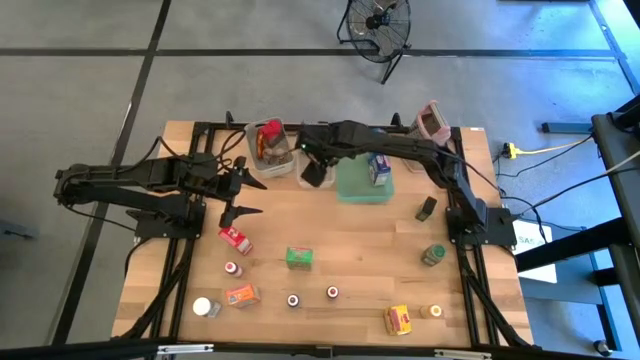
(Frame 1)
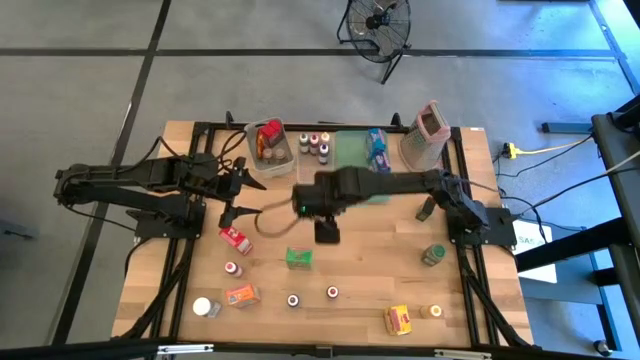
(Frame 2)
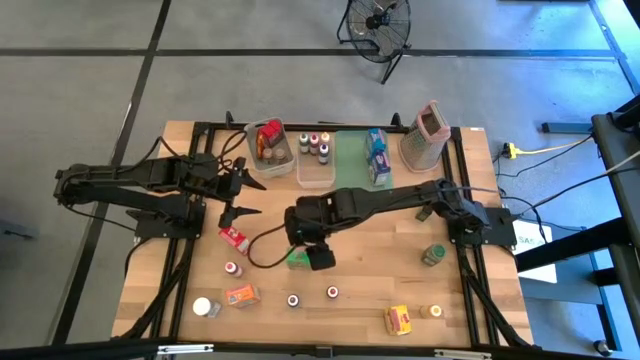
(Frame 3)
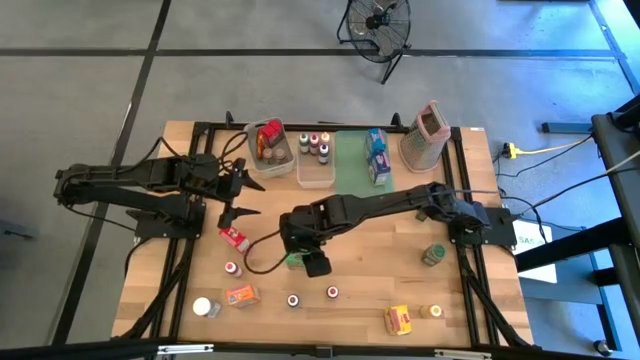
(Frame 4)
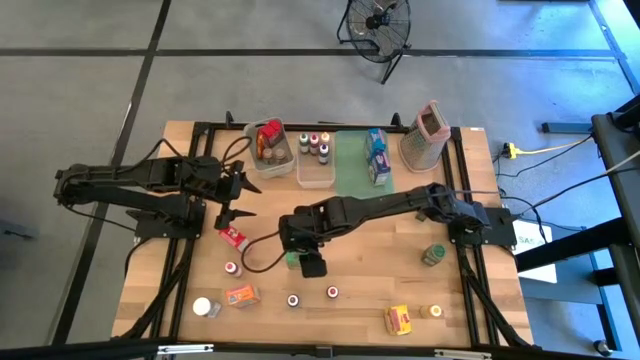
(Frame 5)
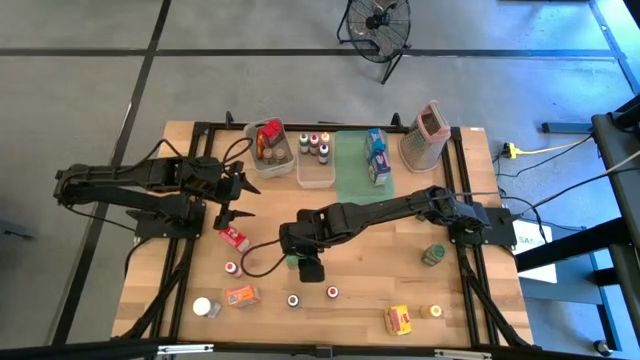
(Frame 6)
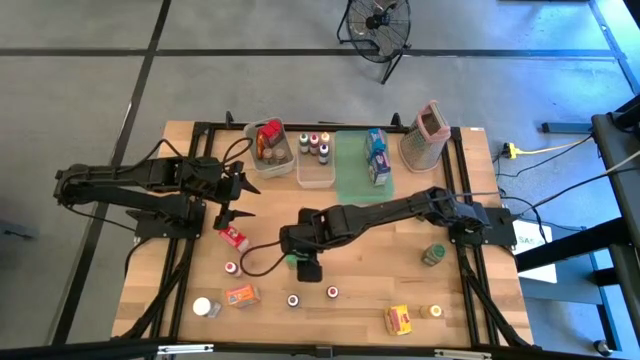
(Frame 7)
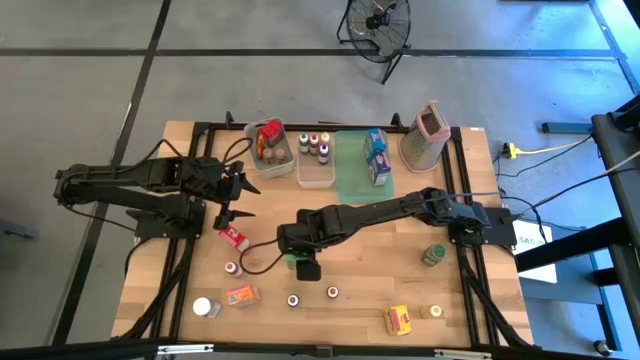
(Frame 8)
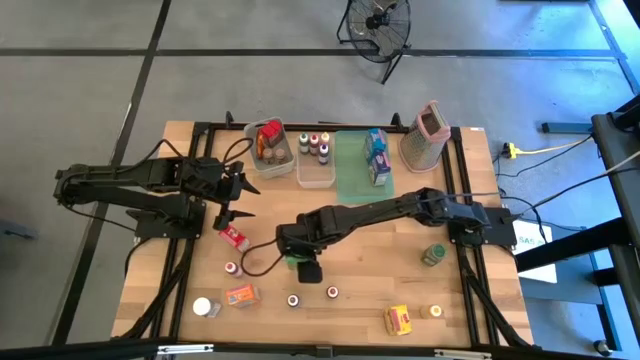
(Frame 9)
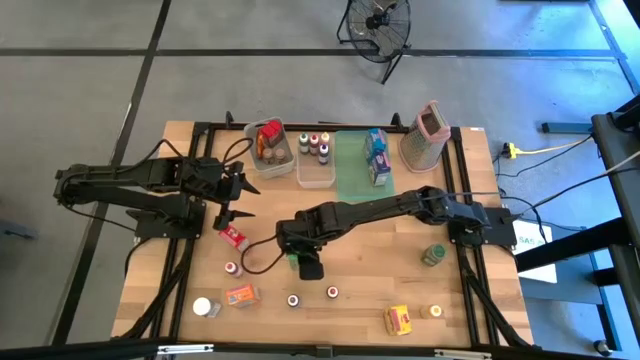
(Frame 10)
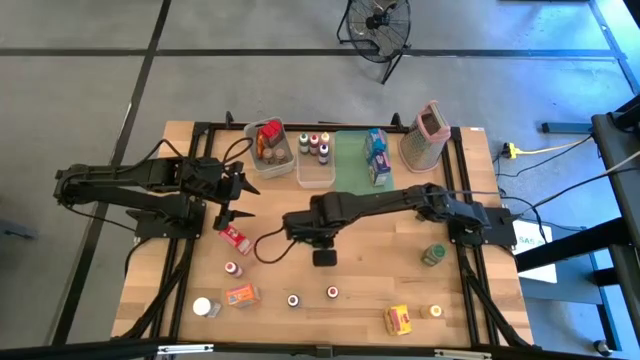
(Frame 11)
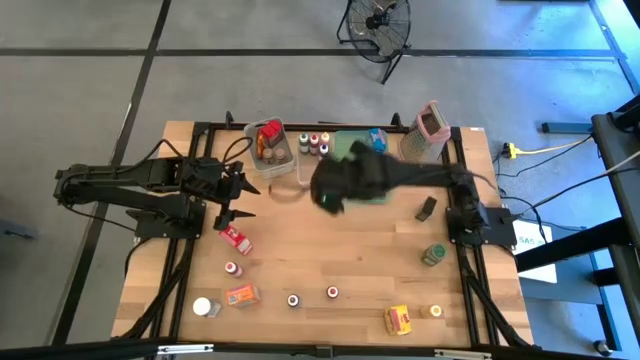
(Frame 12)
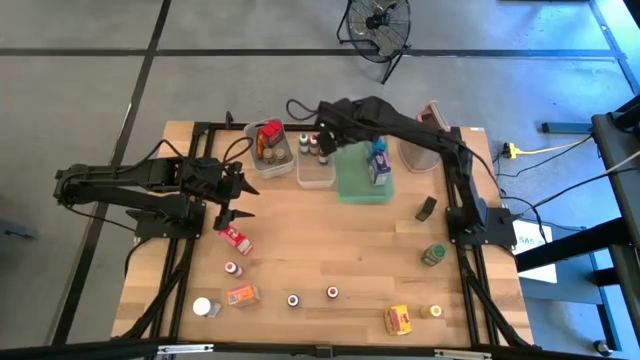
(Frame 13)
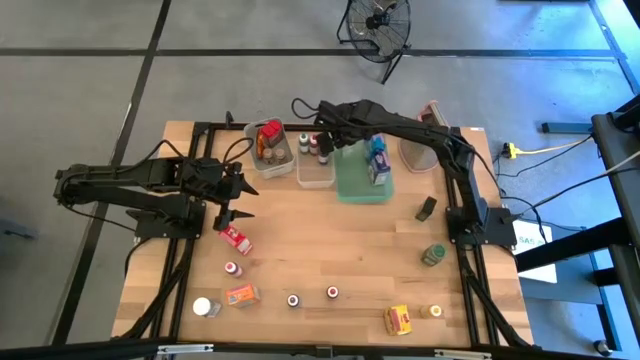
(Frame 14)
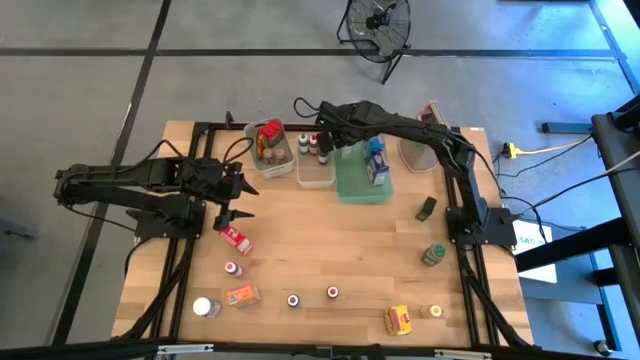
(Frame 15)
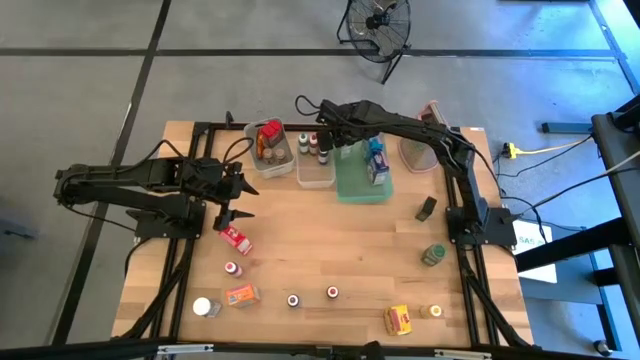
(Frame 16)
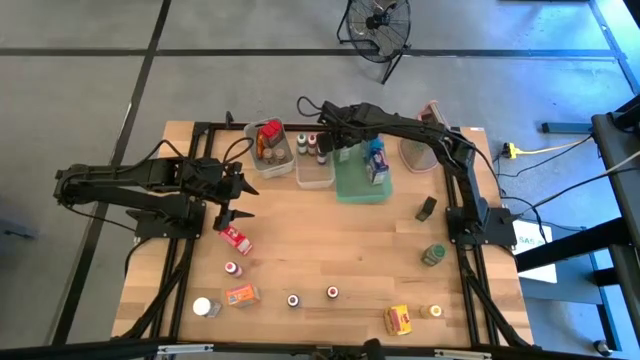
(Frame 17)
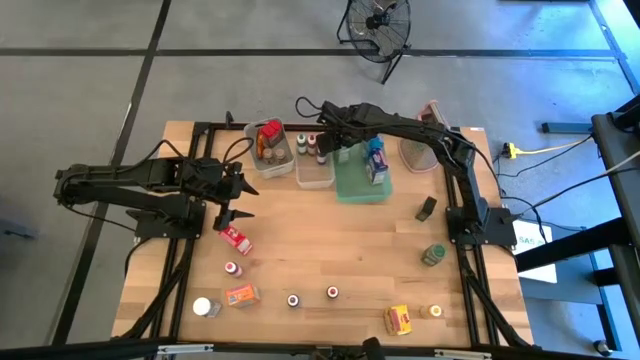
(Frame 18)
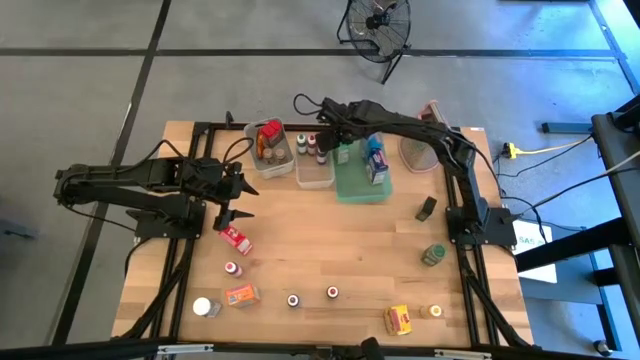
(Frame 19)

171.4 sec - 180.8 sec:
Task: Pick & Place Kitchen Items
Put the green cereal box into the green bin

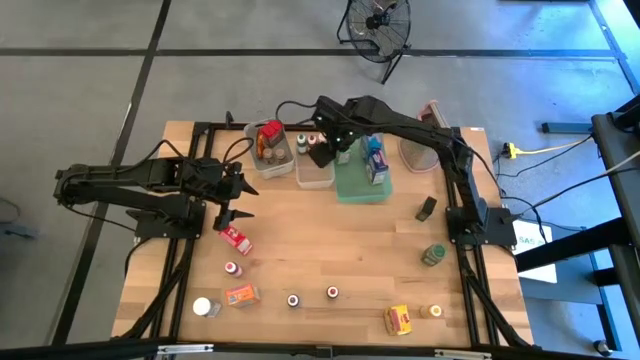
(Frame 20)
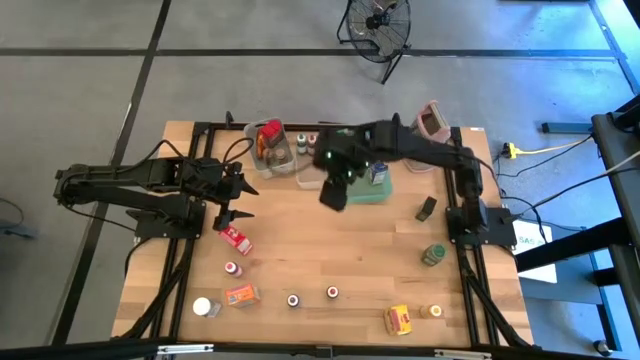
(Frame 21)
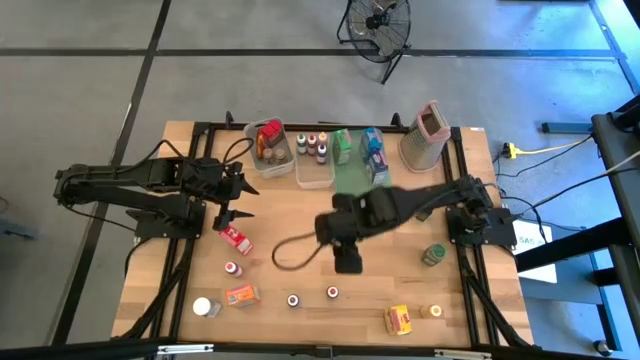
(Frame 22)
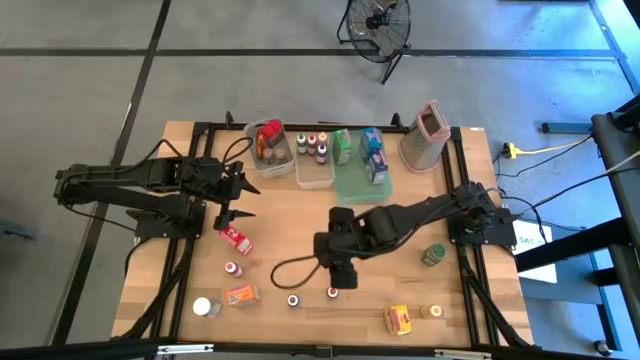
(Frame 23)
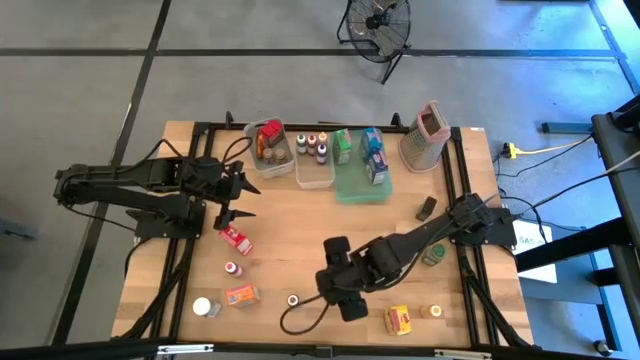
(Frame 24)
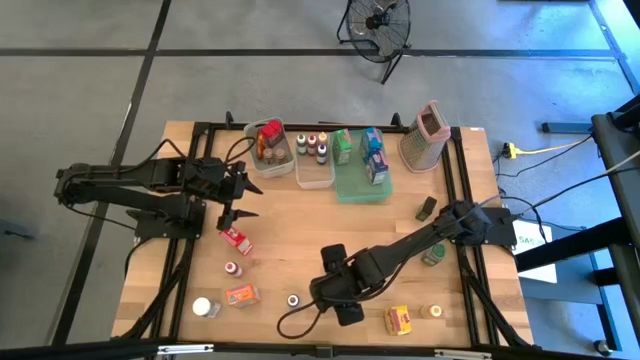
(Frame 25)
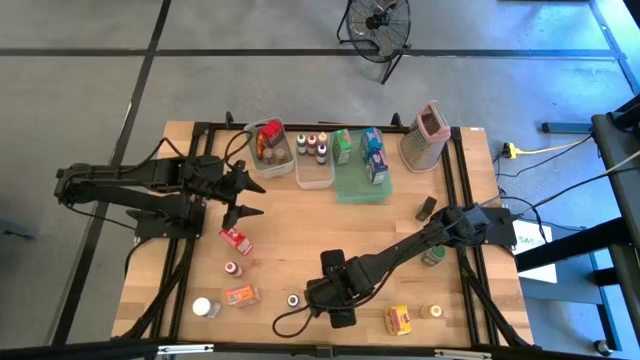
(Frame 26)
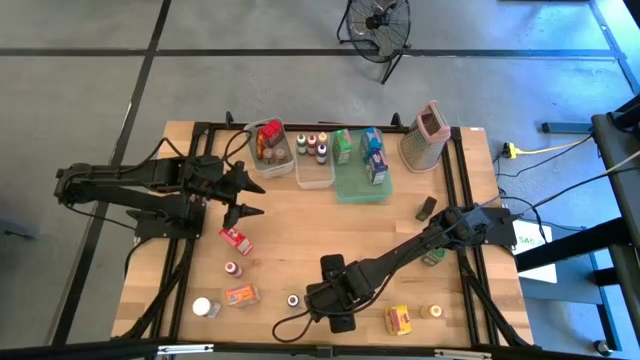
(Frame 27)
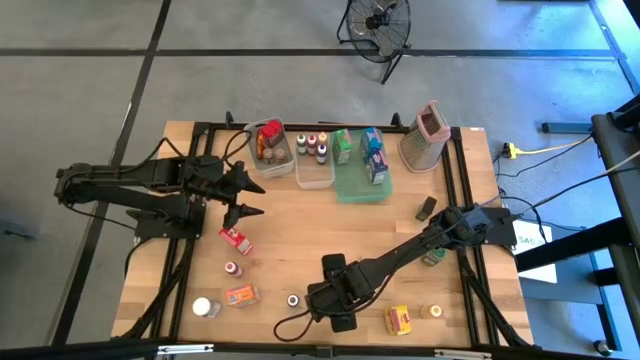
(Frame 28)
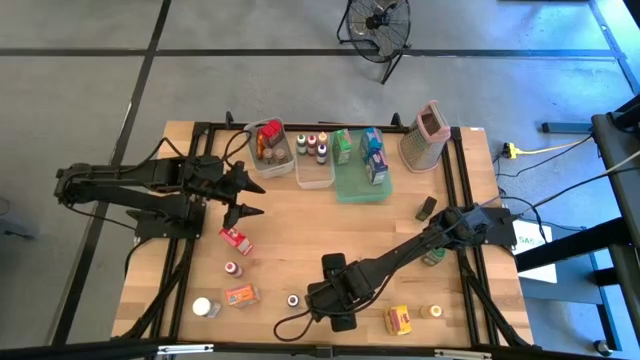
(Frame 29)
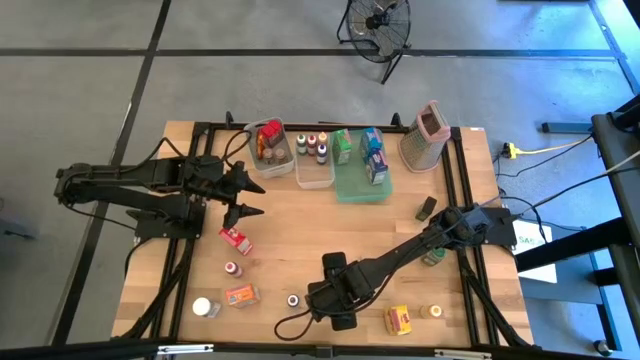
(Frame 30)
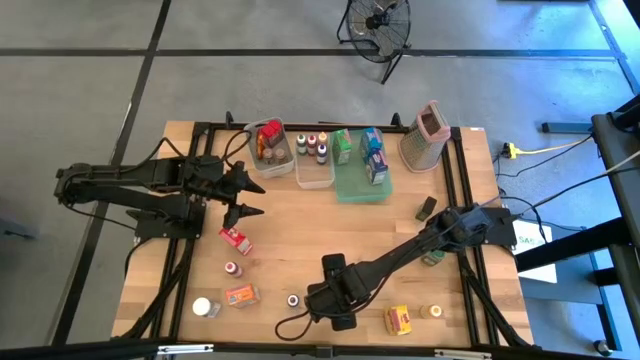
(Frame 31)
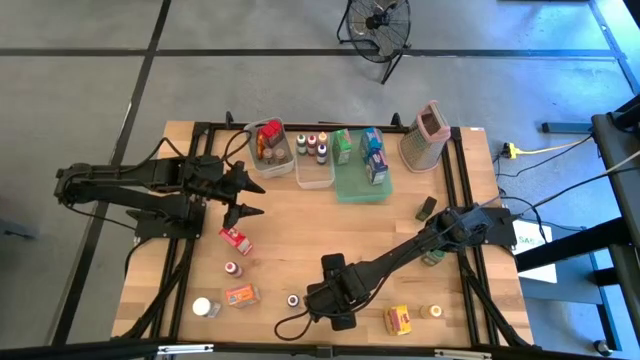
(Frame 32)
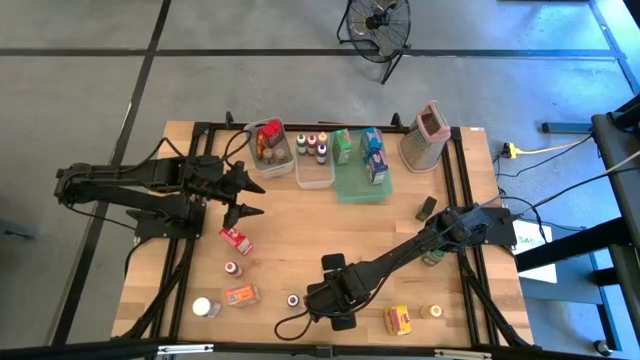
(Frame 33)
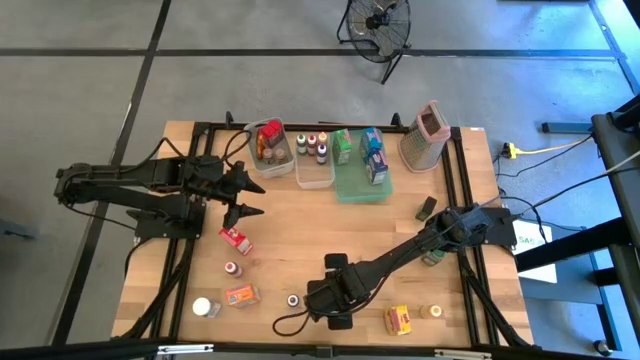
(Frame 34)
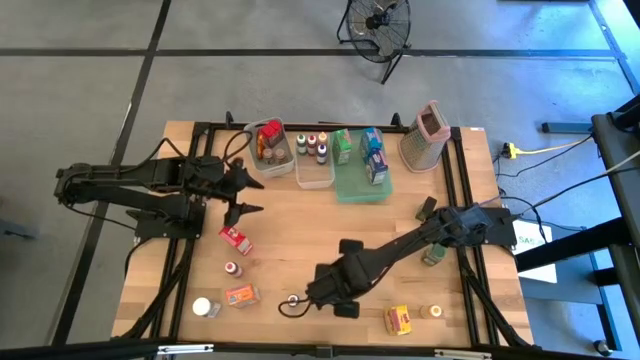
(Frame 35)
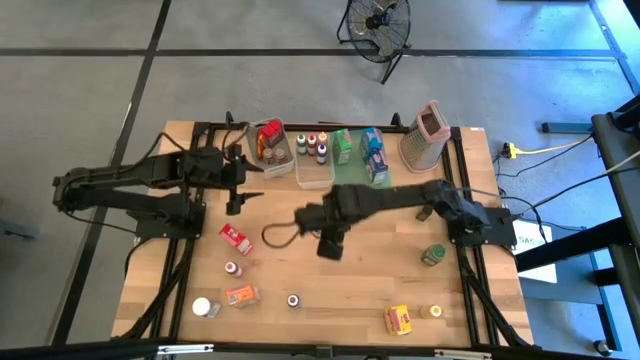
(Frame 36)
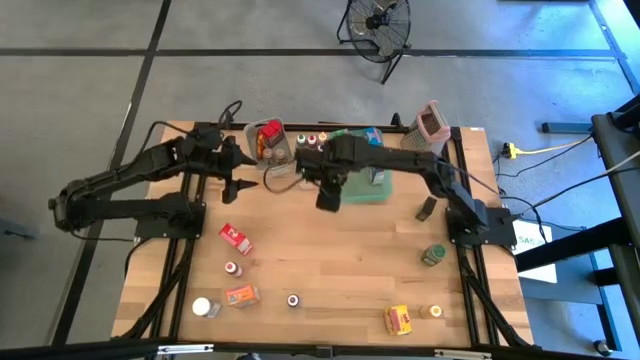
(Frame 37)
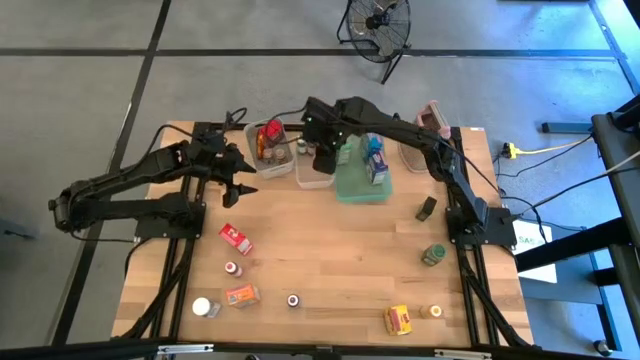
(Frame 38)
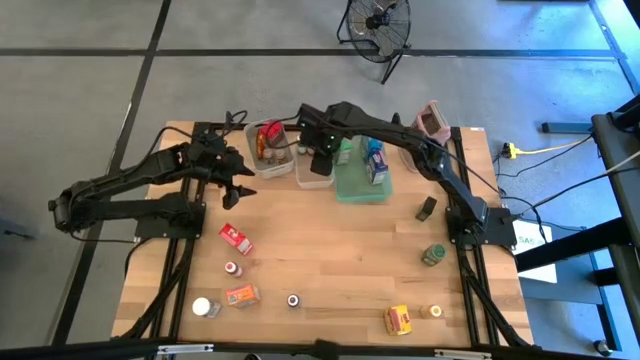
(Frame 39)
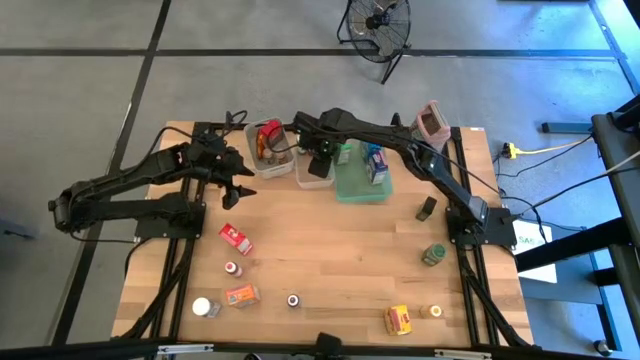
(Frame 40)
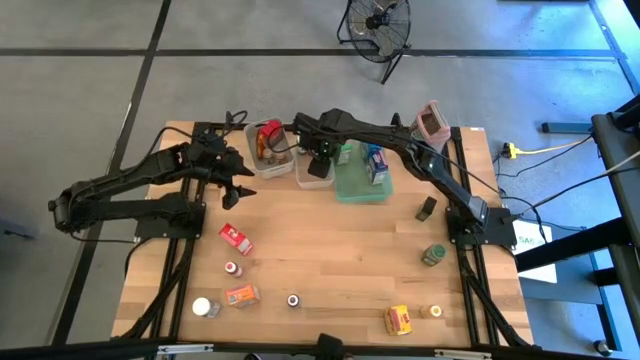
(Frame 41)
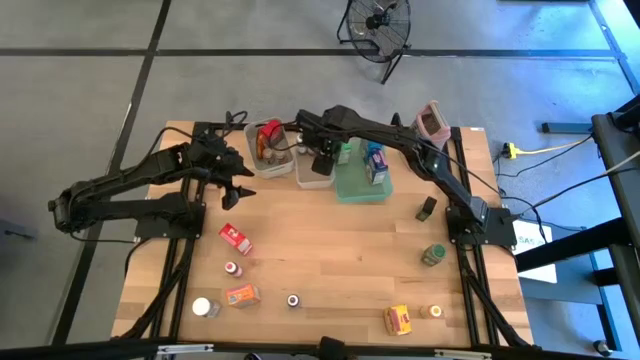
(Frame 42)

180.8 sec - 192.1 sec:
Put the red food coloring bottle into the transparent bin
